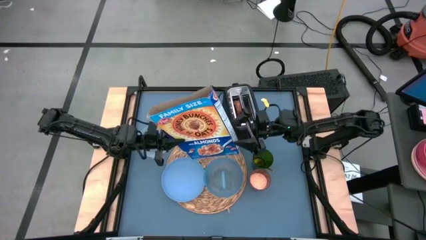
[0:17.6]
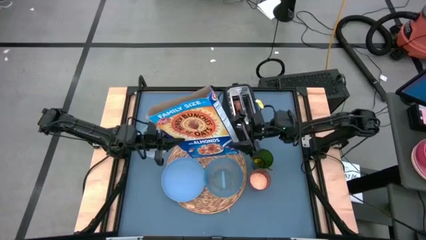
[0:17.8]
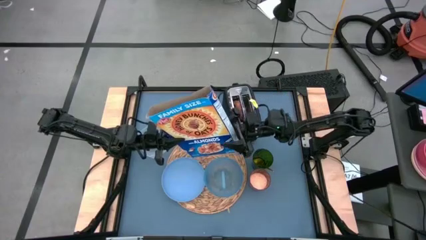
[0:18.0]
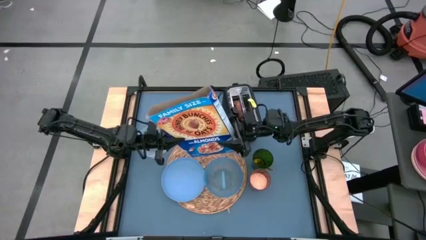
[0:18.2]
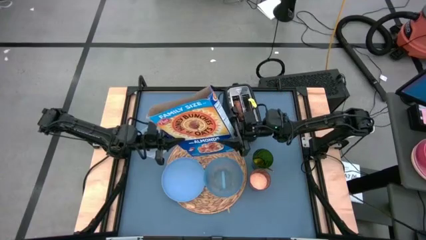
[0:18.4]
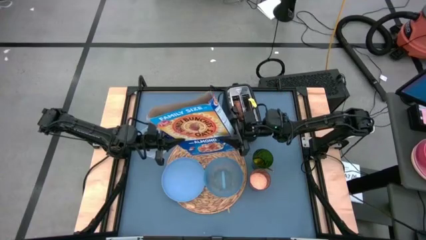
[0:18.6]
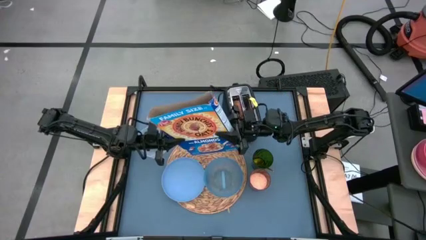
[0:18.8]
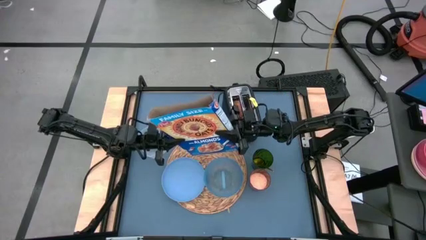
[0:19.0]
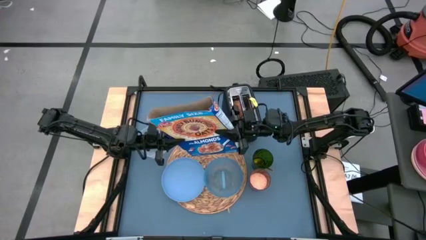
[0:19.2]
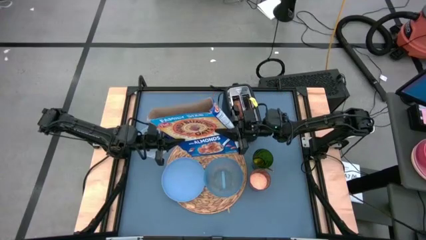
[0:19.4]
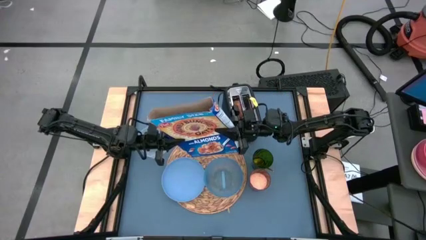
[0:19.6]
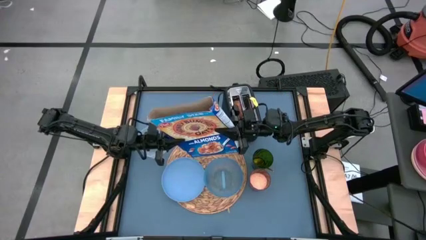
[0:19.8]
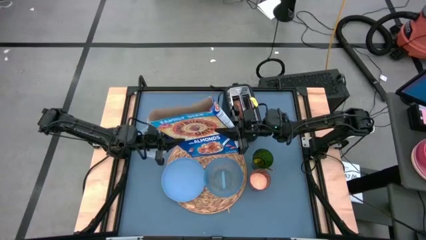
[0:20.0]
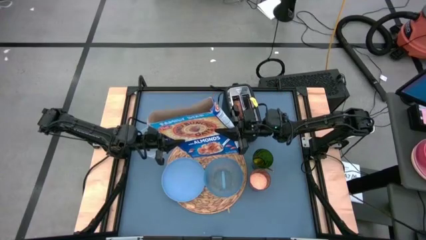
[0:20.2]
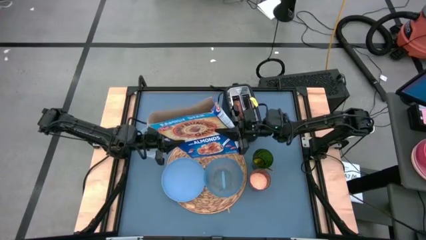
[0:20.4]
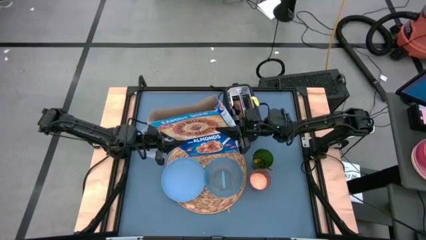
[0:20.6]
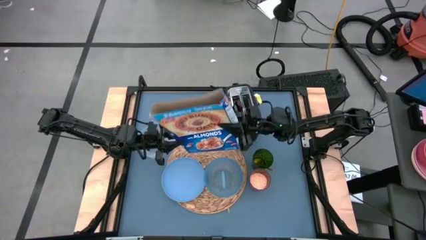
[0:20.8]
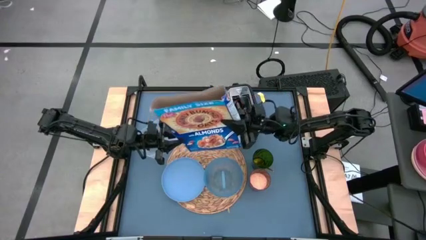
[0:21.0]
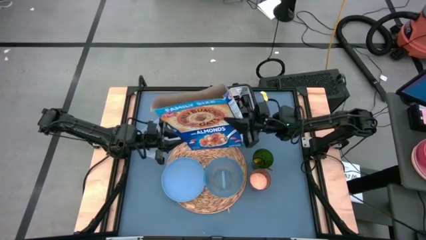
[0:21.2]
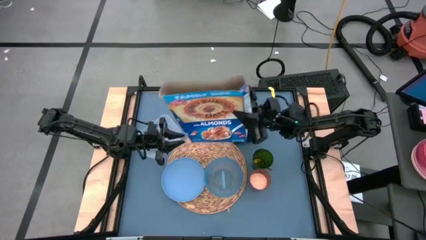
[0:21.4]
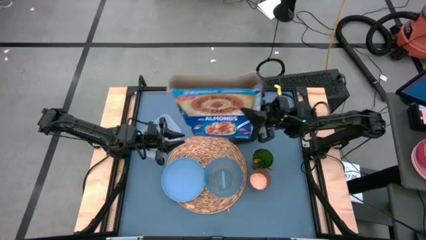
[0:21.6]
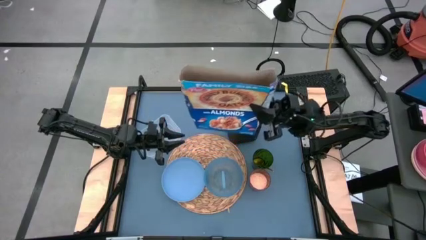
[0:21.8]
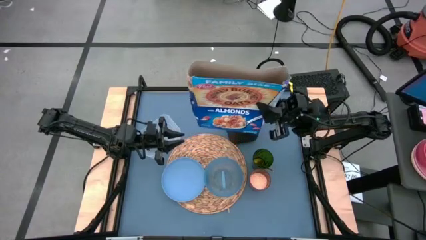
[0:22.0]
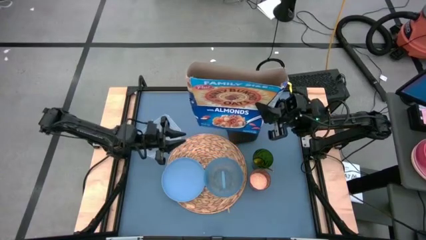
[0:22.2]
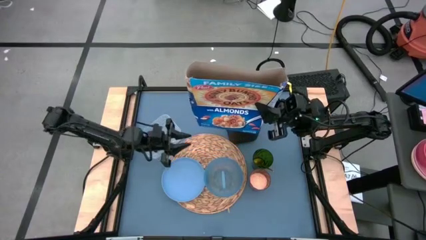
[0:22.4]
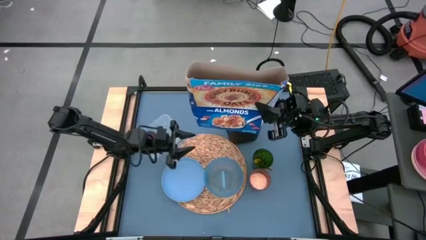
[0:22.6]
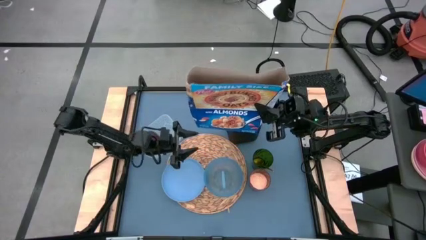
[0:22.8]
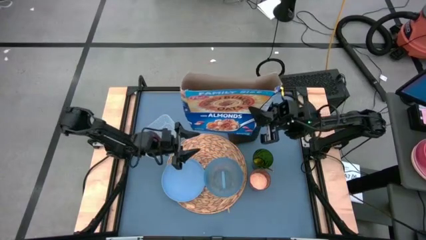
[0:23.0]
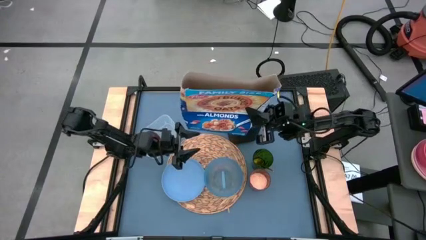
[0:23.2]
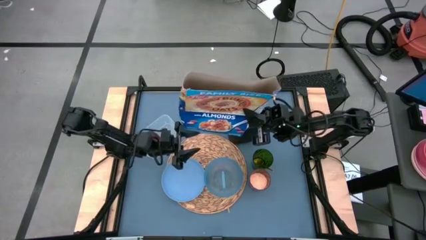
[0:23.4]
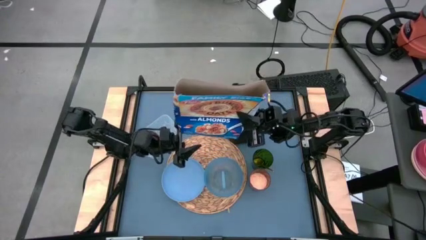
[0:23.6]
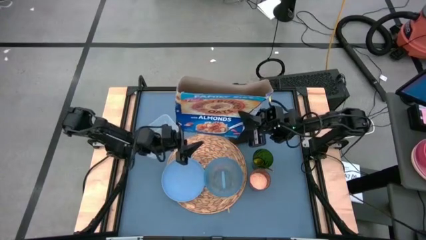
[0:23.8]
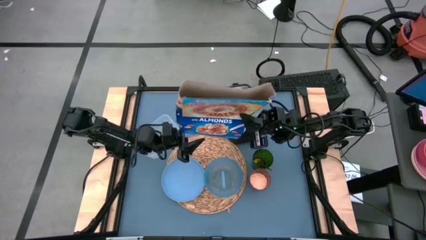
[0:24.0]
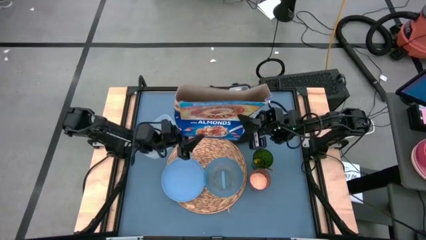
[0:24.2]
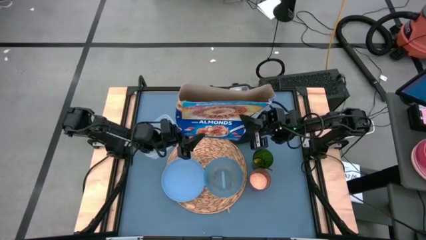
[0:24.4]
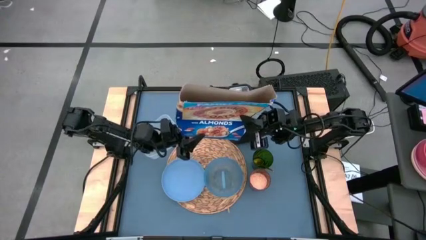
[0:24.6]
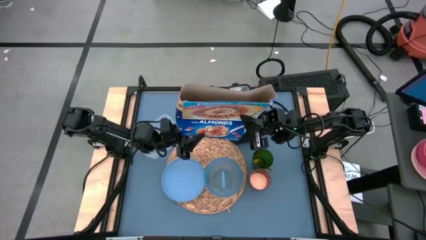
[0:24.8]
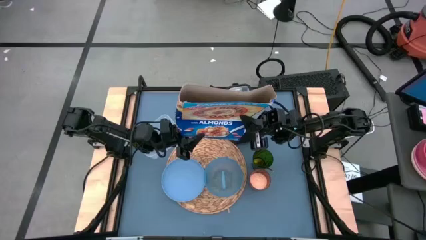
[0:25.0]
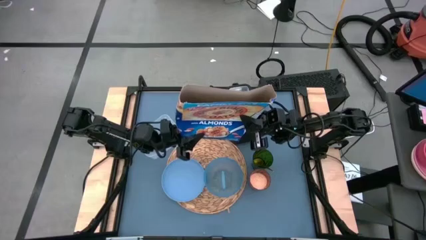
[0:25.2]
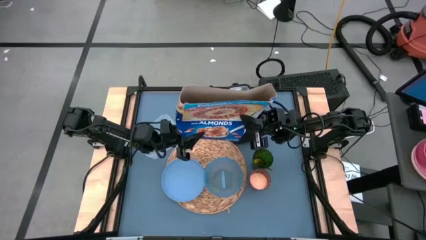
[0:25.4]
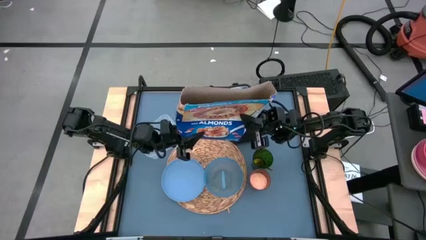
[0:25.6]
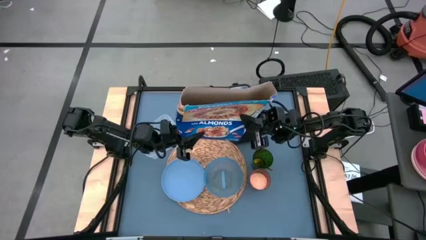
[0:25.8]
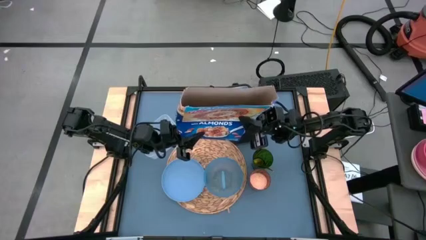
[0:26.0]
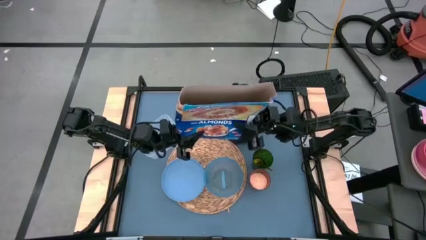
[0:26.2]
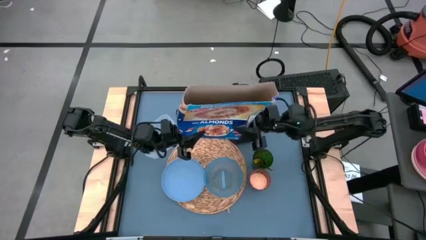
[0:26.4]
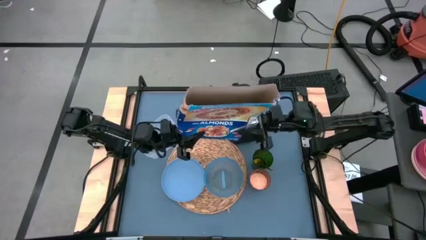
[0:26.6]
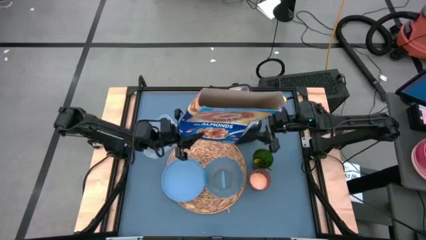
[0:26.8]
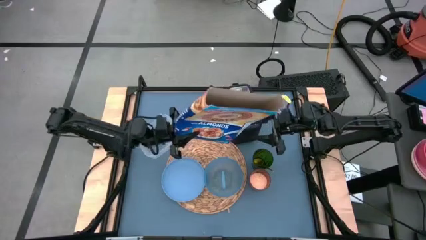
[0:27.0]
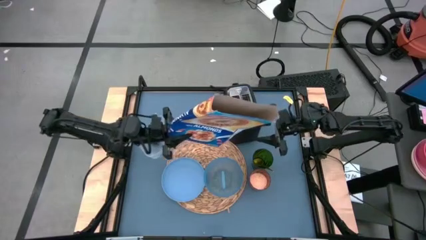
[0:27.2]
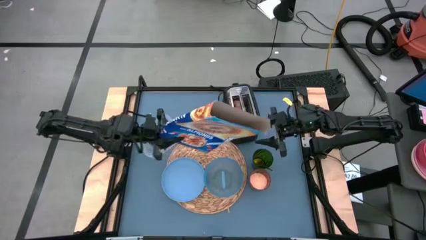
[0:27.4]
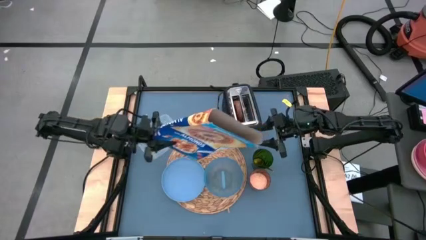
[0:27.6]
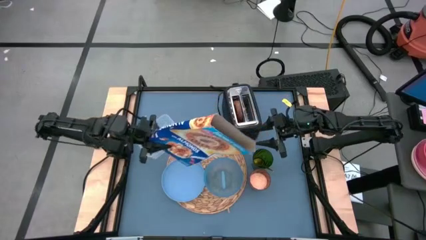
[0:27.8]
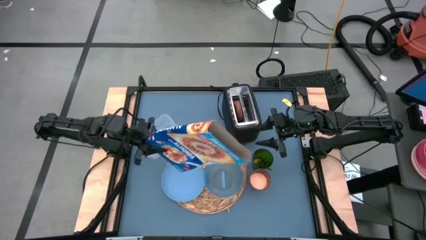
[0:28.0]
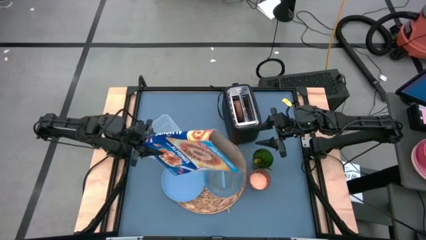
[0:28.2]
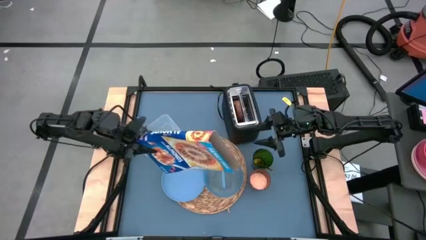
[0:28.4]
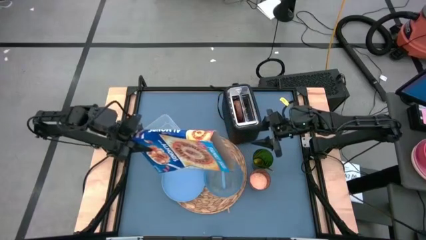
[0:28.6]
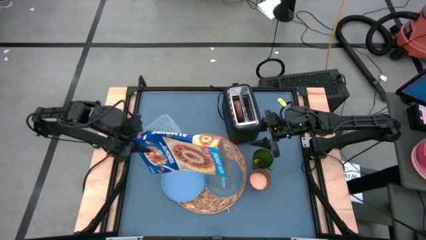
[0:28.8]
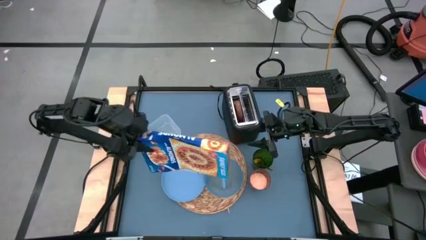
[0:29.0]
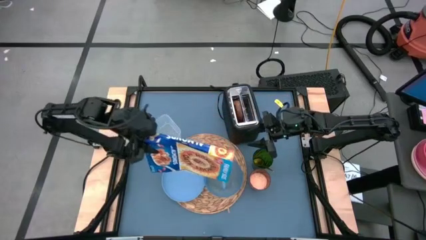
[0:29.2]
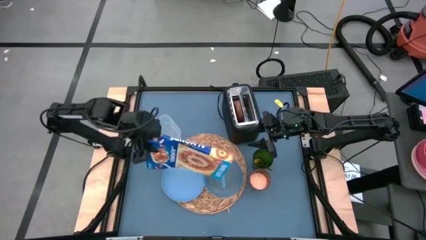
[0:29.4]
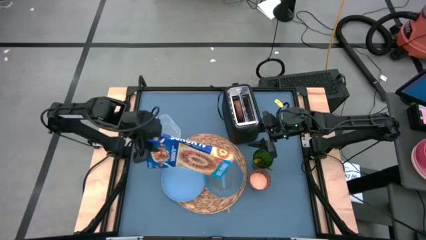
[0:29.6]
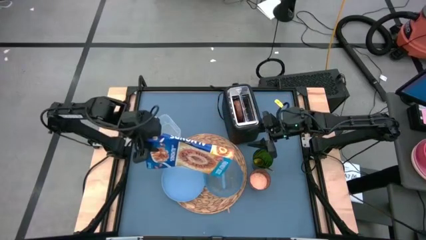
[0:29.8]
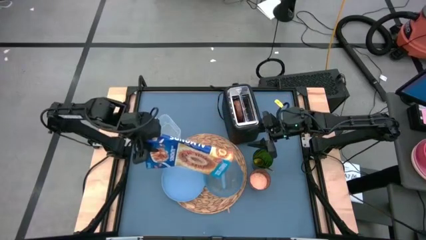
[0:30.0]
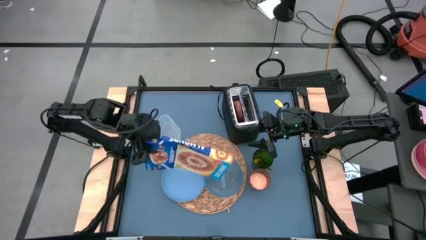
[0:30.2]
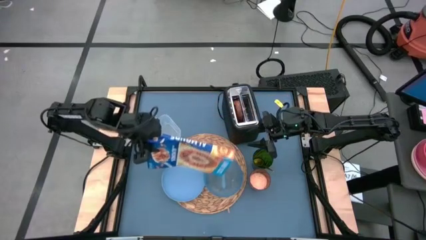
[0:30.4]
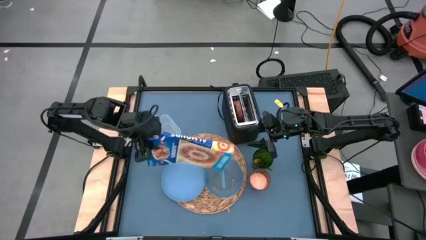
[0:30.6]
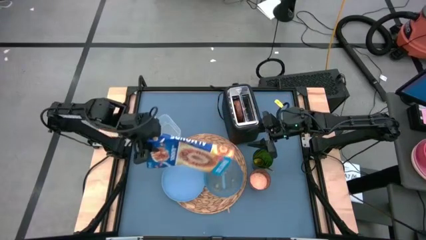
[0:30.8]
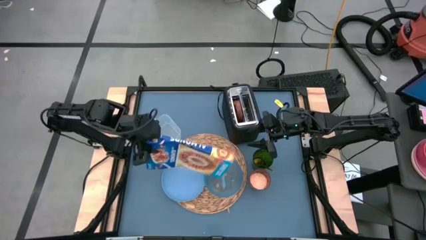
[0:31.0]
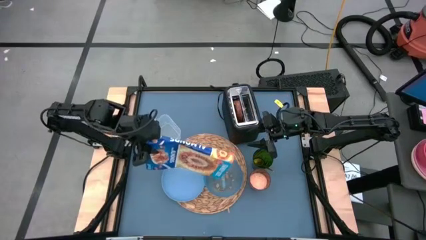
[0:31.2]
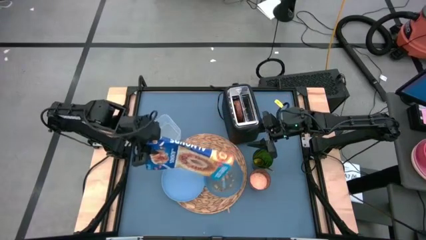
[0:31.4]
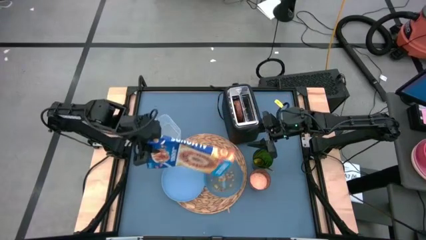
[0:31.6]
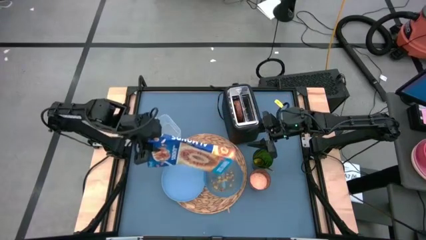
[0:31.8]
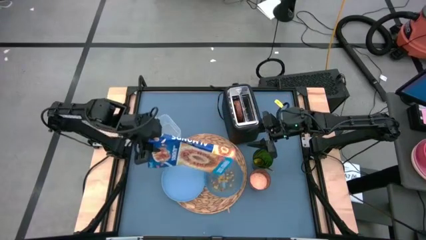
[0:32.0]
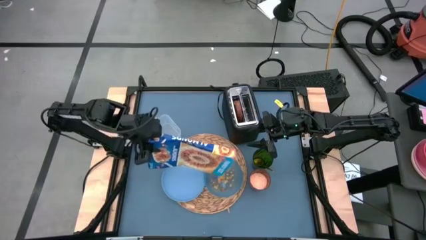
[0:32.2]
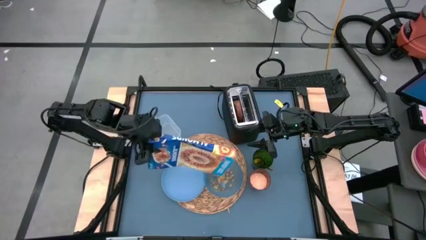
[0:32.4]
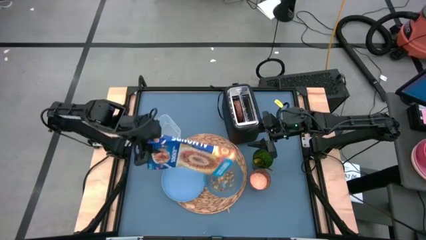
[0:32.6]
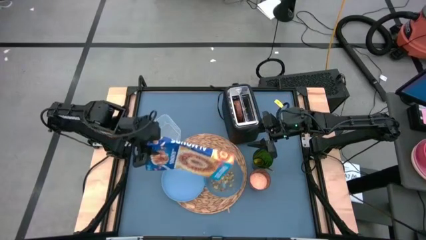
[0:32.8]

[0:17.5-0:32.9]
Task: Arrange a breakfast setting
Pour the cereal from the cereal box into the blue bowl on the table mat
